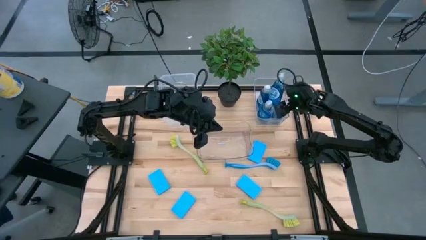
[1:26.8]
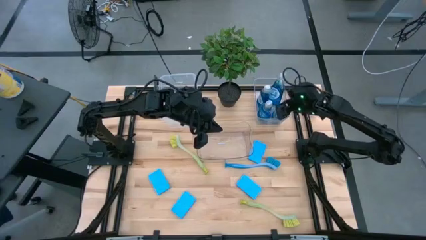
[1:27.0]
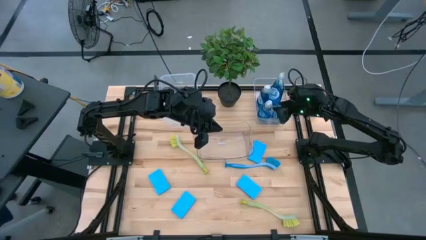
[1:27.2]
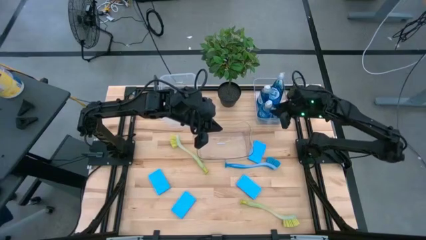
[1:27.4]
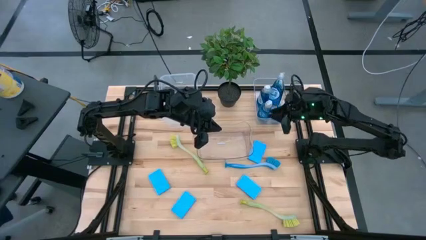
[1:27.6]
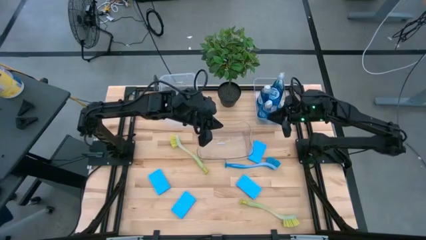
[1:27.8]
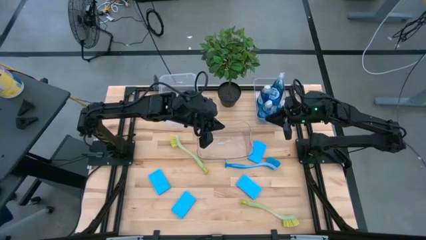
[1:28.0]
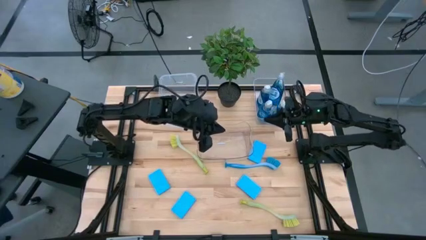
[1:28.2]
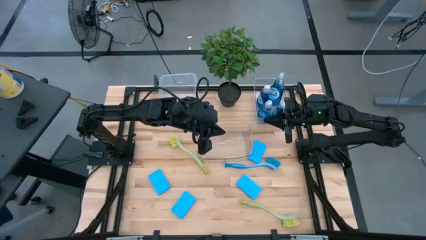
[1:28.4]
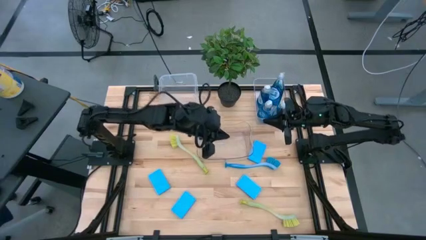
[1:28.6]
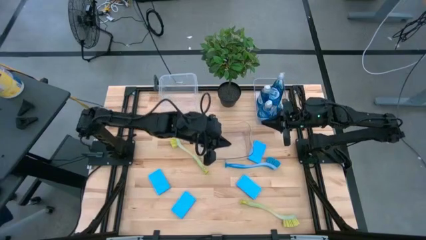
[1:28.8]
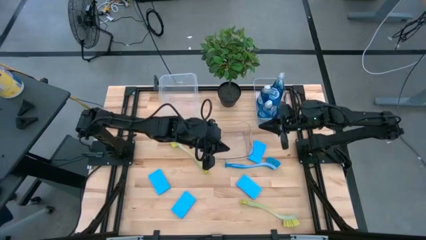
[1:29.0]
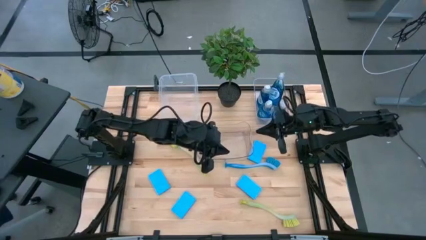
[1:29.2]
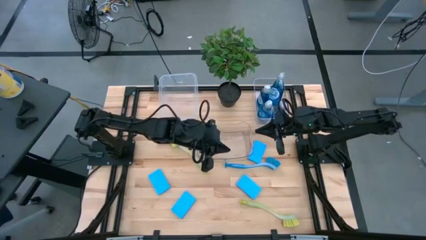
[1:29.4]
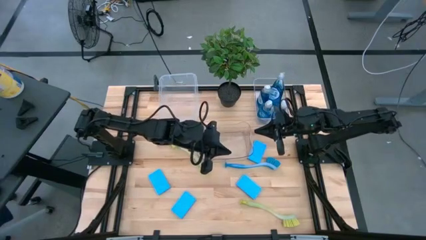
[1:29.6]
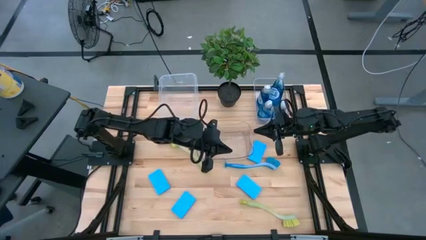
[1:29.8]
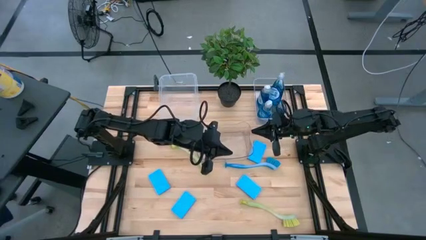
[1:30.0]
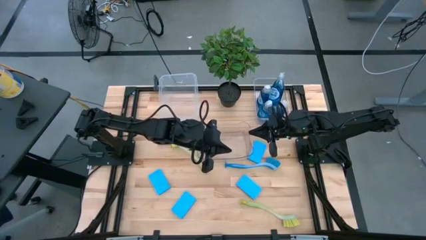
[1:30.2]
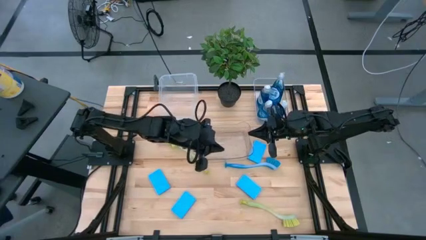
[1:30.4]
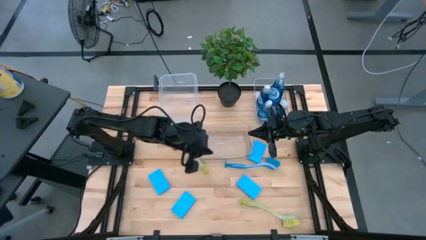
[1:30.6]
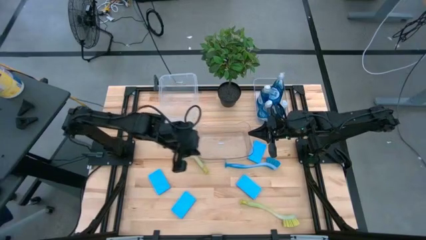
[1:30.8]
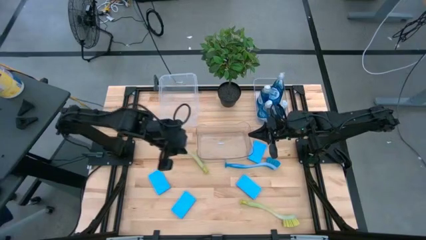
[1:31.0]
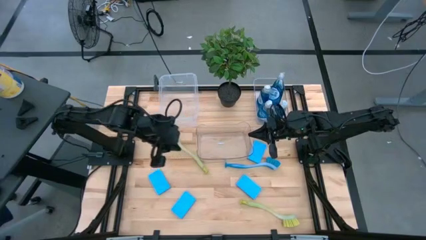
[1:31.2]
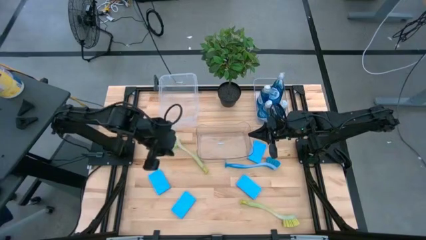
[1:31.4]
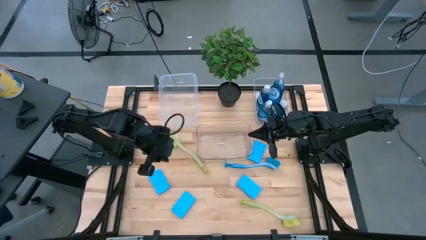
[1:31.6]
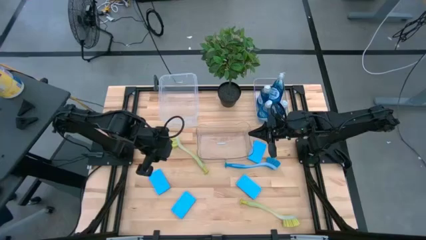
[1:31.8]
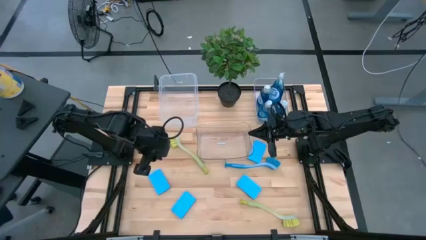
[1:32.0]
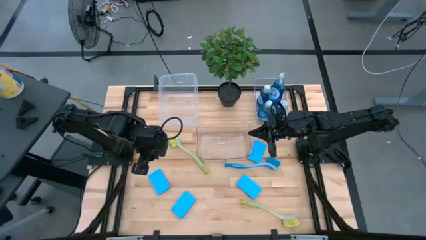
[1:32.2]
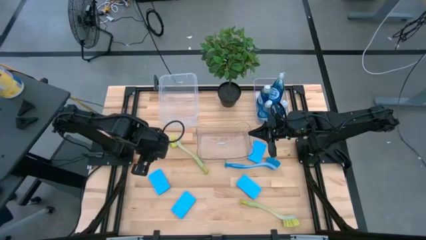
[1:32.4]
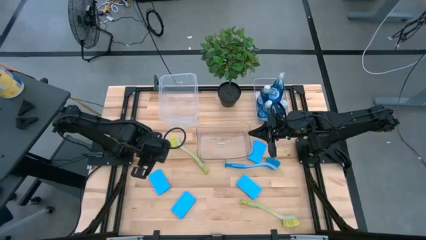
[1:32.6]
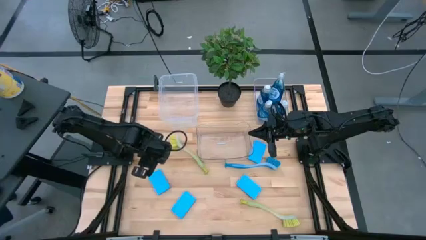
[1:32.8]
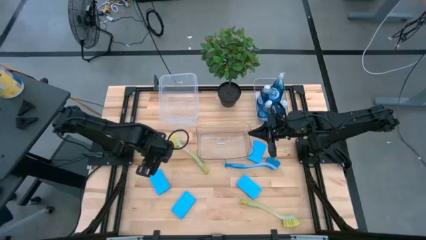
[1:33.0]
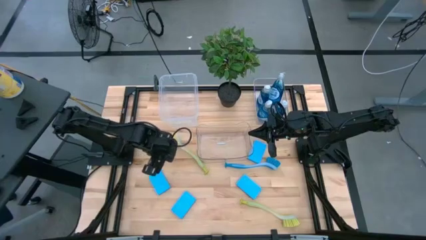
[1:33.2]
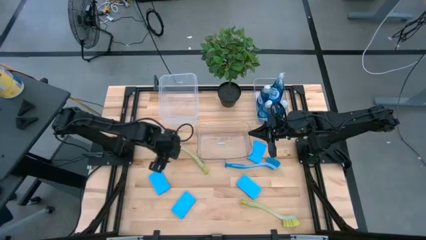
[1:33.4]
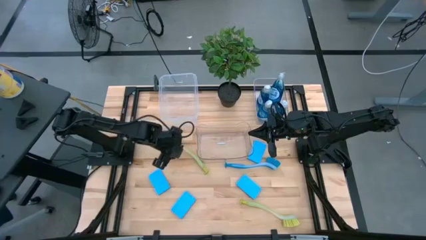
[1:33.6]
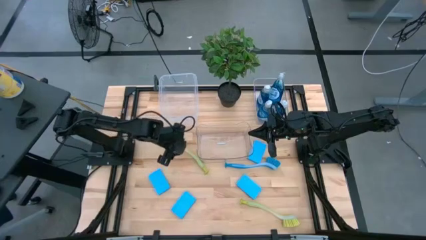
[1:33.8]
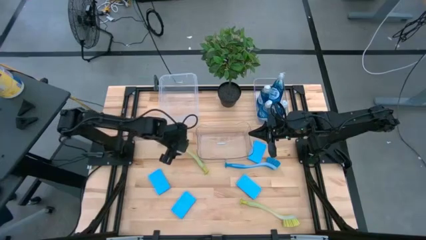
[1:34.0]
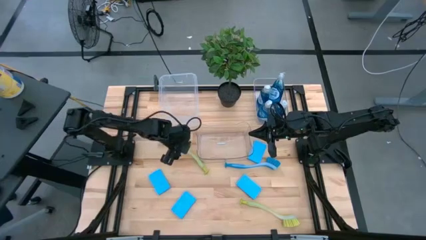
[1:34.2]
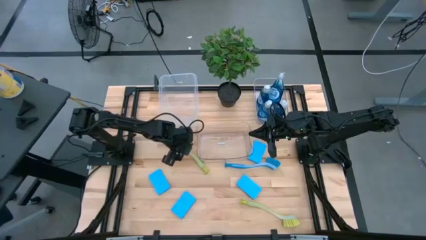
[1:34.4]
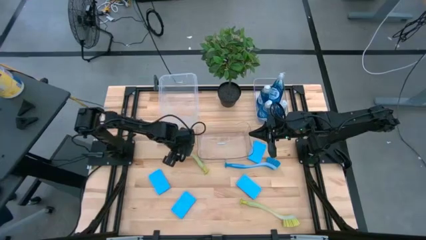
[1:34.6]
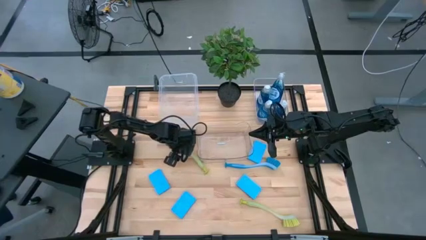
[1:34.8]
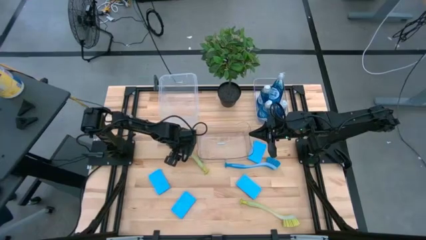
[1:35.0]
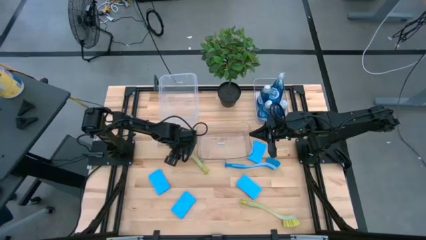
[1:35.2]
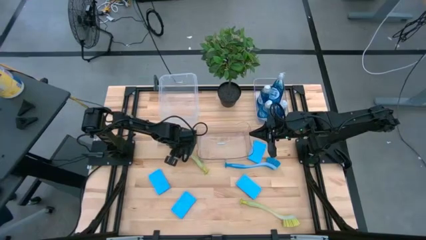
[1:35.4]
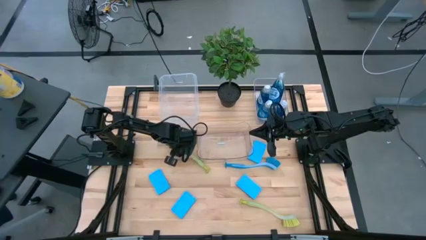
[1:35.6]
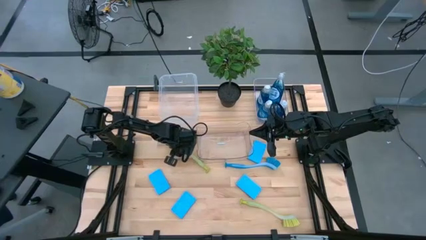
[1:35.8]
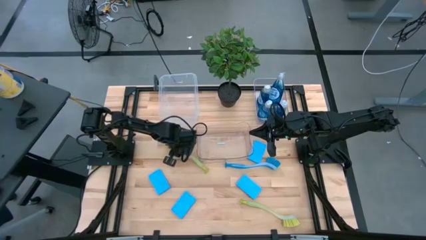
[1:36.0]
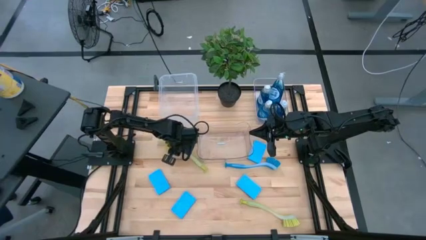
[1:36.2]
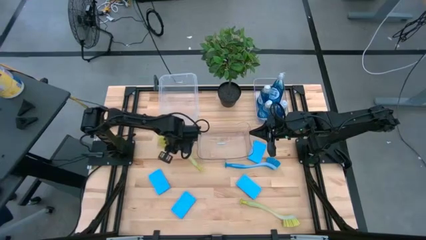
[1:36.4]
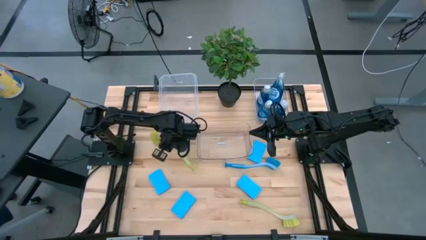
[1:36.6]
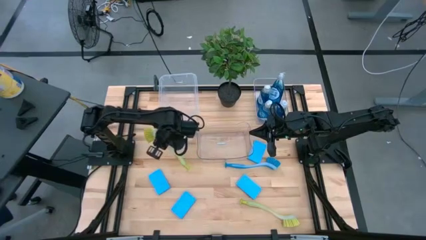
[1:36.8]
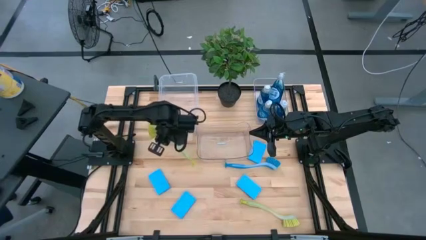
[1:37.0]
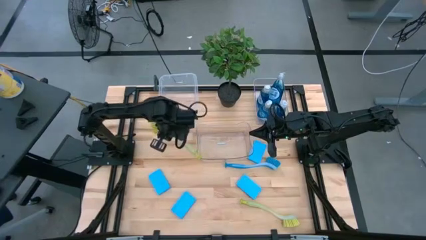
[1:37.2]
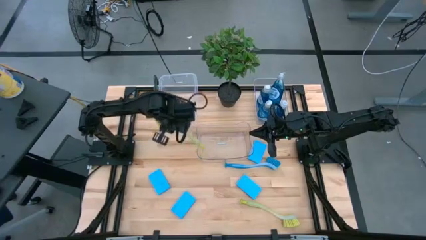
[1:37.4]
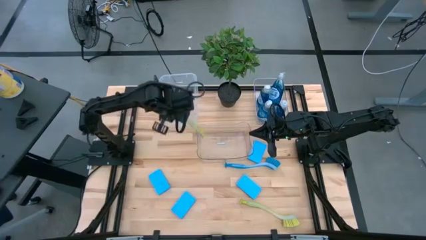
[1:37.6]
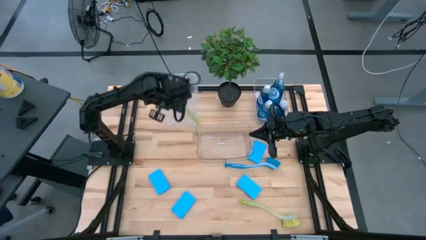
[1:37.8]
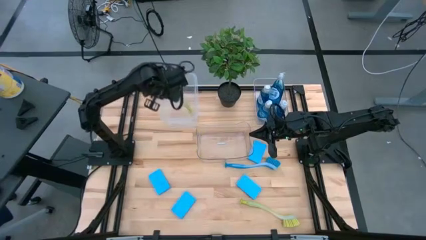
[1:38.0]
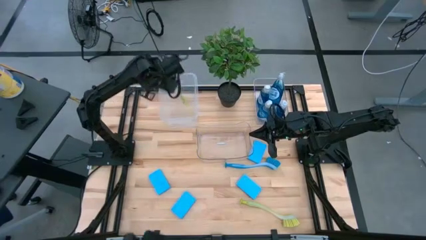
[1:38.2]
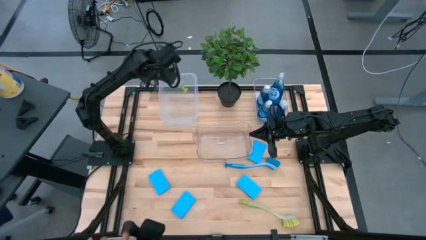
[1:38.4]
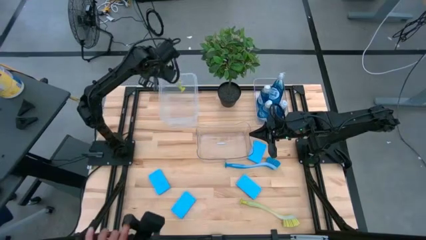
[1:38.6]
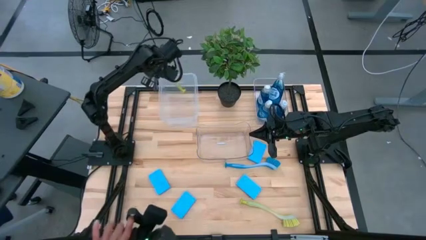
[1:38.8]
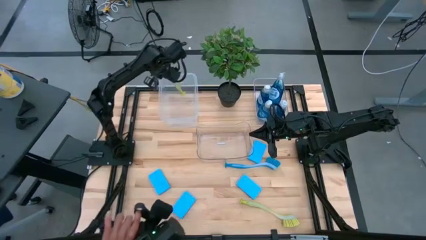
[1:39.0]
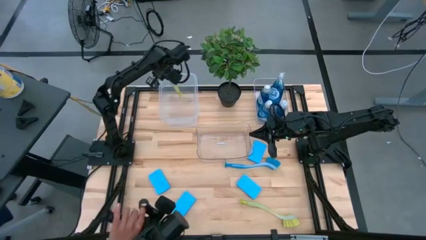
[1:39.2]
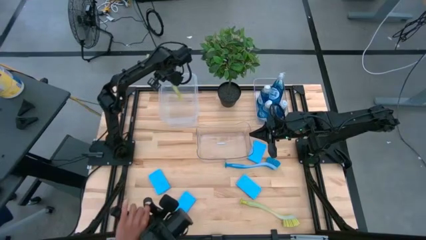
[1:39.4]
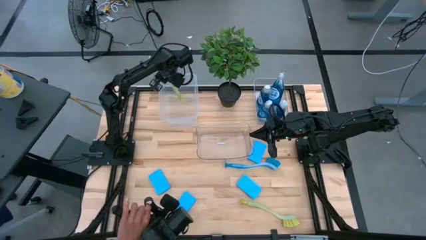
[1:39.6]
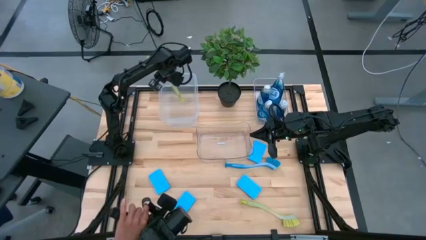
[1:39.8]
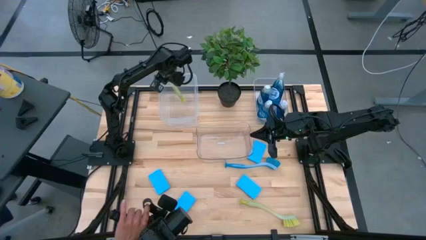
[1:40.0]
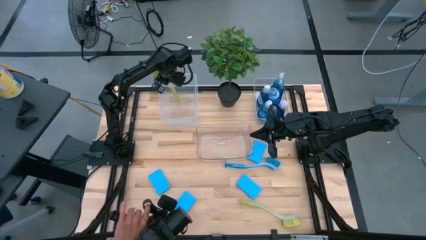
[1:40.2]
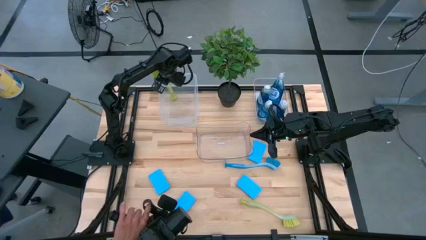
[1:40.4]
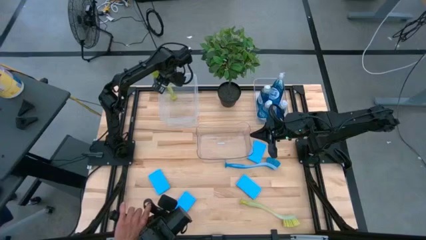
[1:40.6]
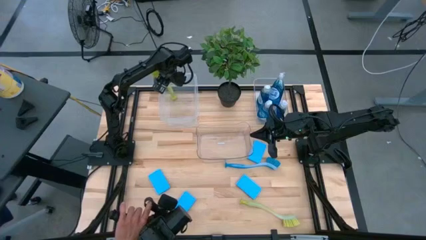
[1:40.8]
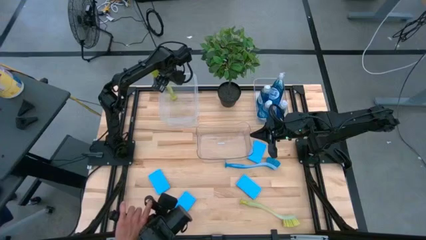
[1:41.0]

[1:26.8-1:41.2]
Task: Pick & Place Kitchen Sink Supplies
Put the green dishwashing brush into the white bin

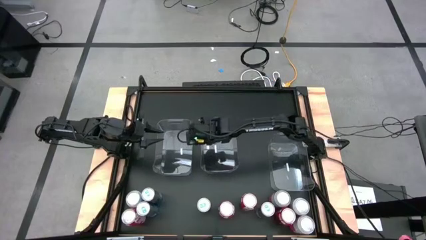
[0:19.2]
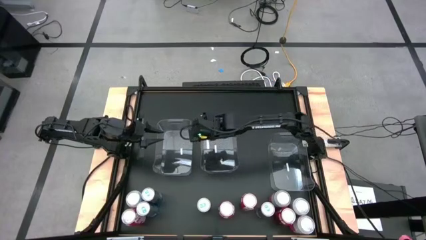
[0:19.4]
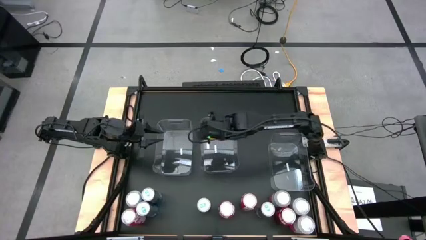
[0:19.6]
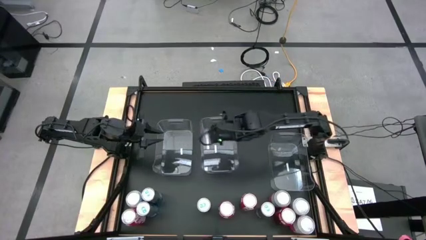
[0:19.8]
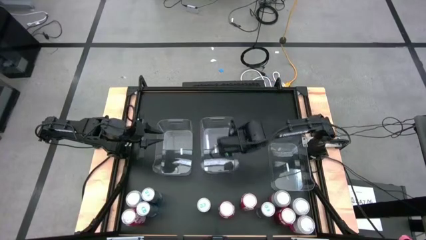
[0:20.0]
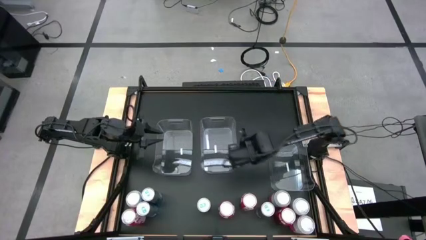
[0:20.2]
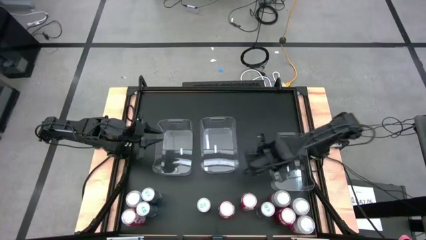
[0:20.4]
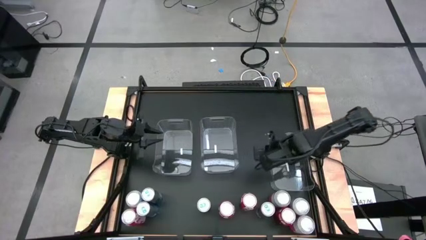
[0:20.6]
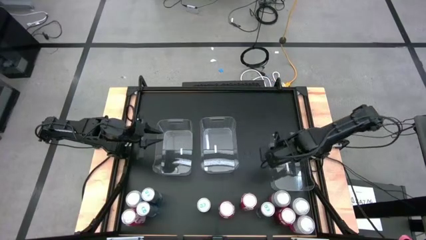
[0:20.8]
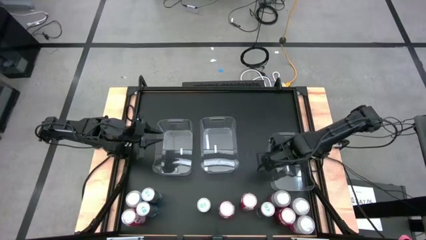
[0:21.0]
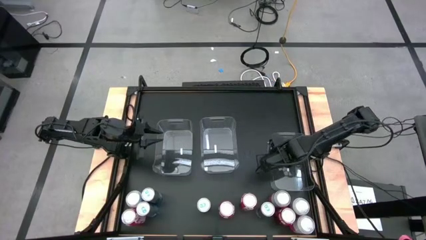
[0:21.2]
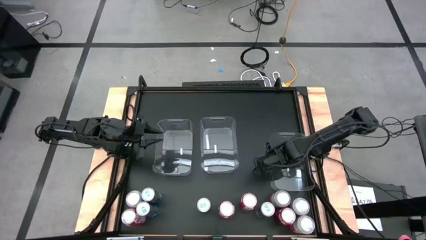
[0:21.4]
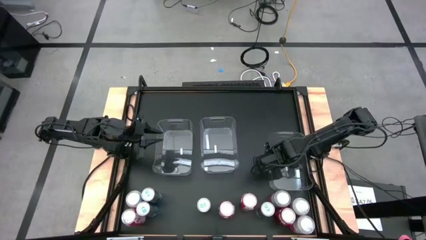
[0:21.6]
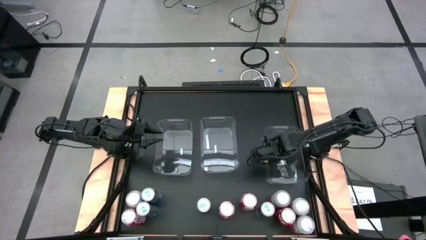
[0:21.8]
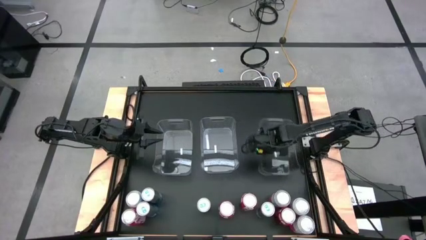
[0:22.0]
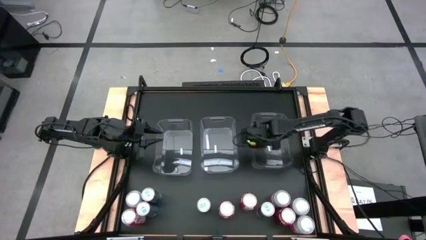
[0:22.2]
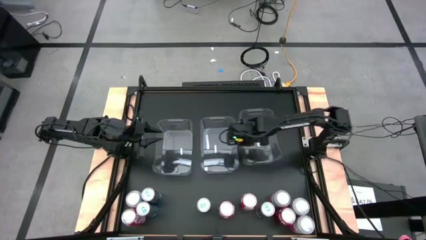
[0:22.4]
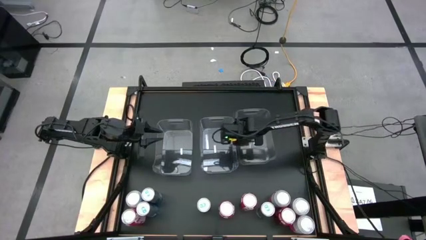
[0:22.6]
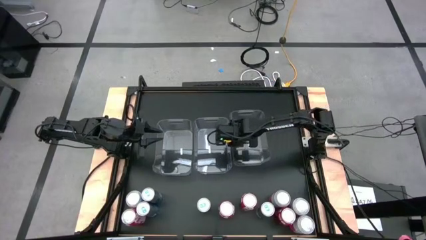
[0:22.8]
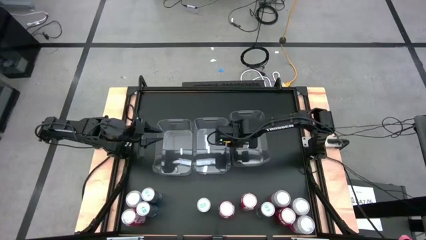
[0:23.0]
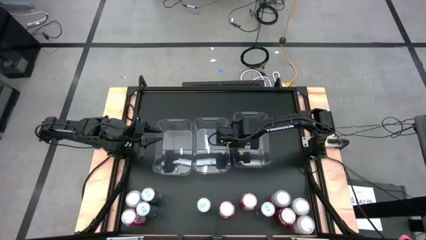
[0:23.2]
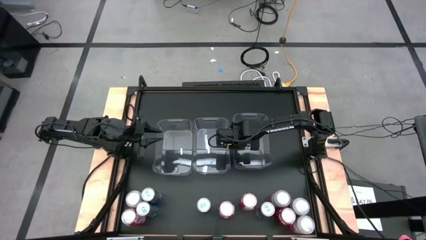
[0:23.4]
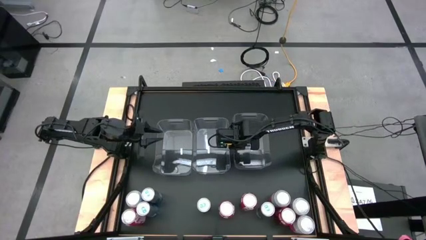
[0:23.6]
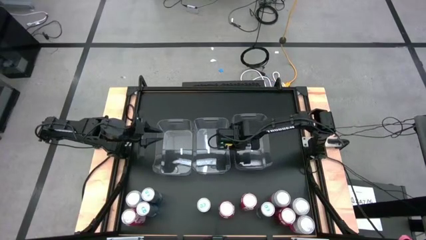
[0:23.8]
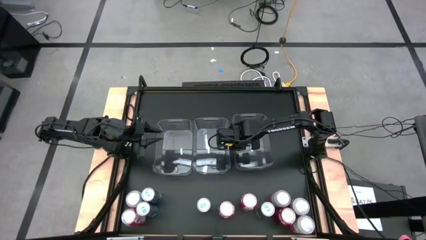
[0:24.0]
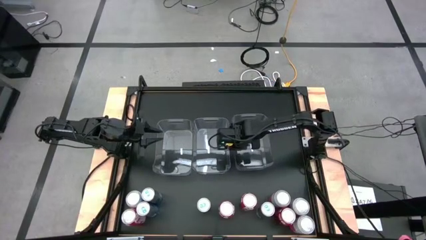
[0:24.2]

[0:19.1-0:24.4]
Task: Sort soda cans
Move the bottom right transparent bin to the middle right of the table
